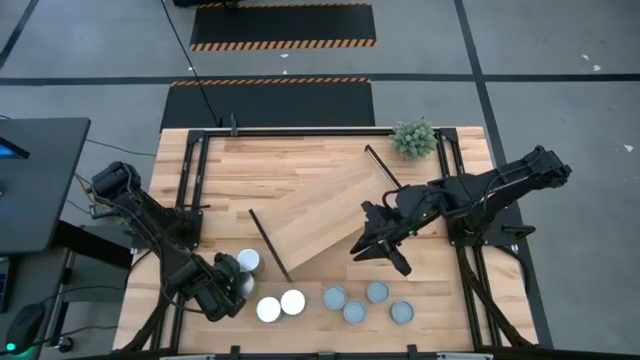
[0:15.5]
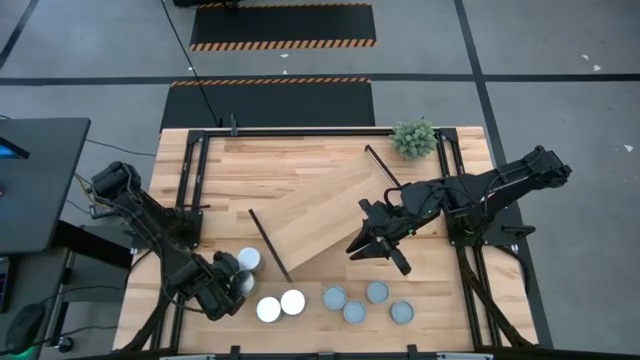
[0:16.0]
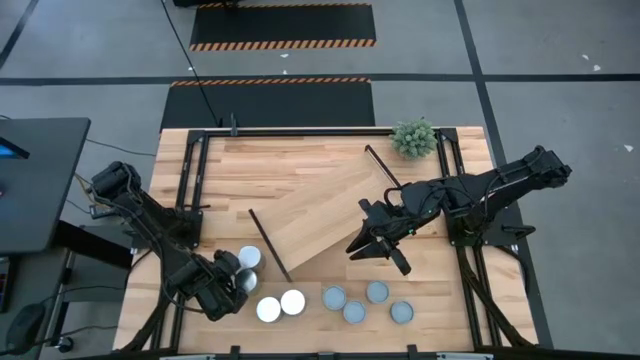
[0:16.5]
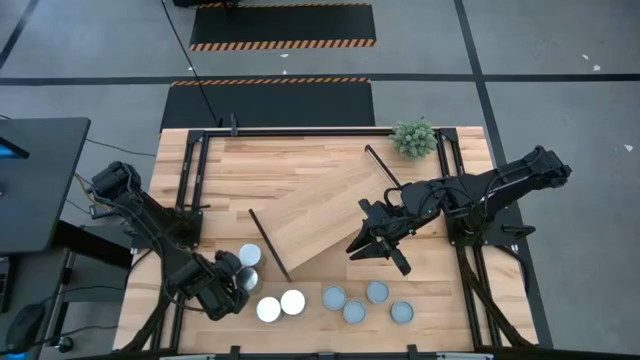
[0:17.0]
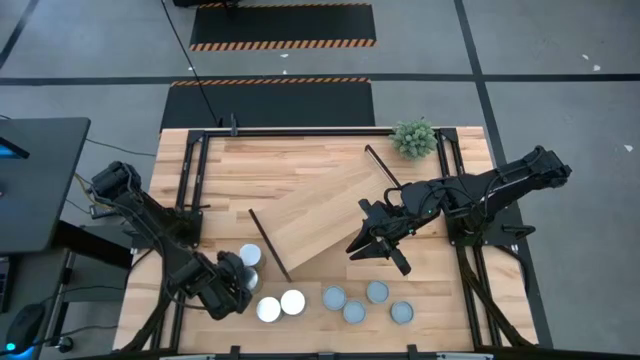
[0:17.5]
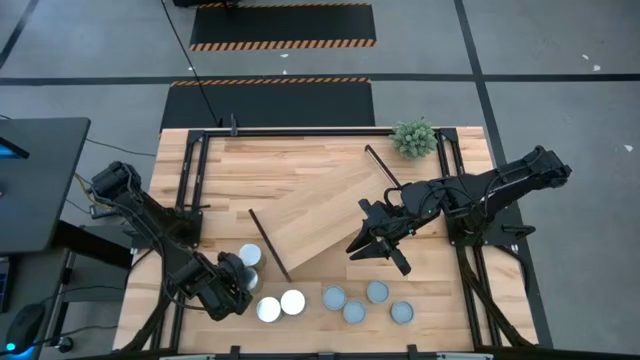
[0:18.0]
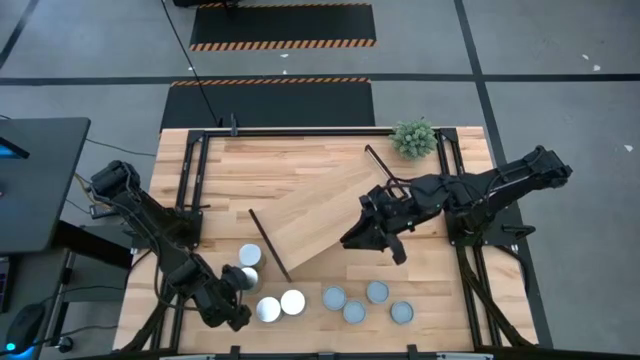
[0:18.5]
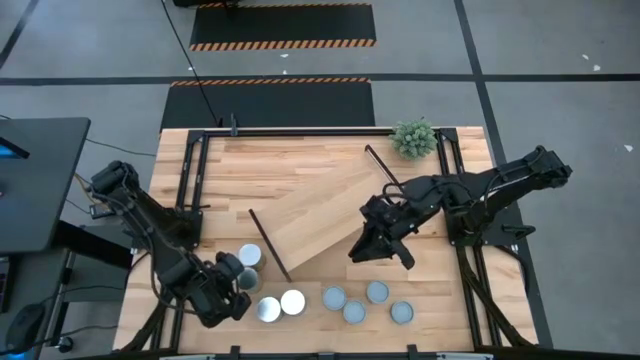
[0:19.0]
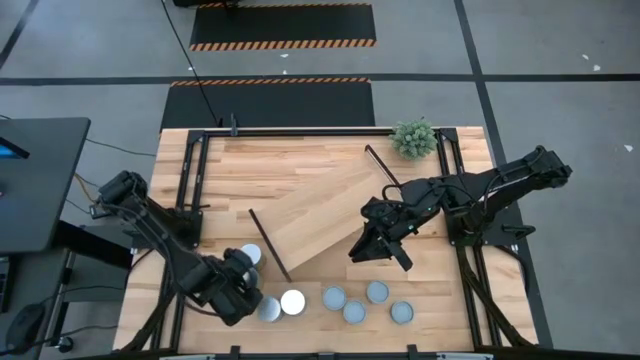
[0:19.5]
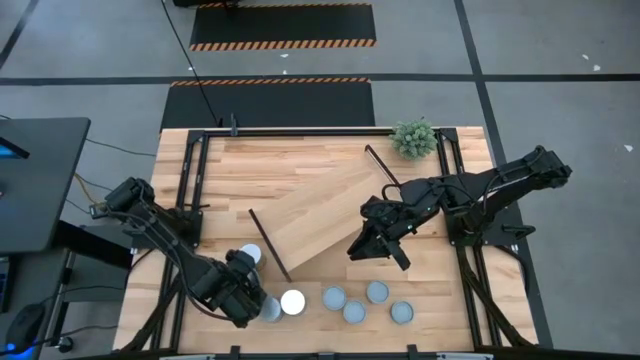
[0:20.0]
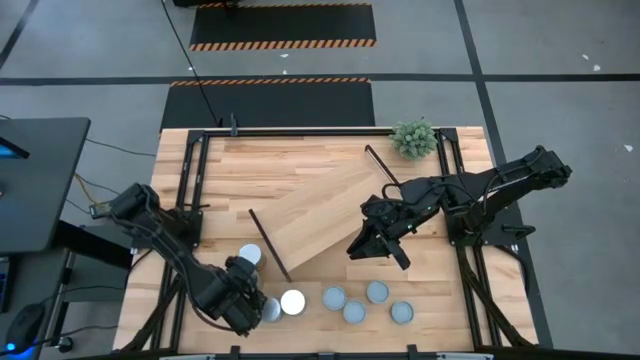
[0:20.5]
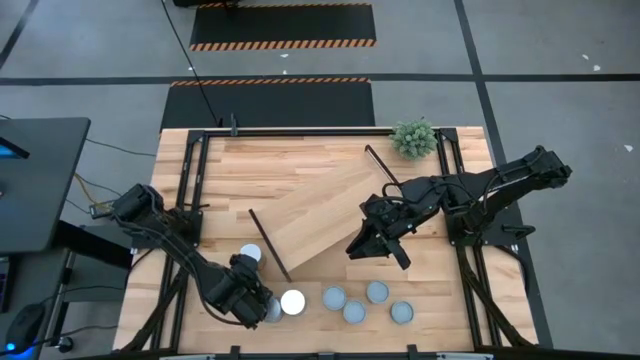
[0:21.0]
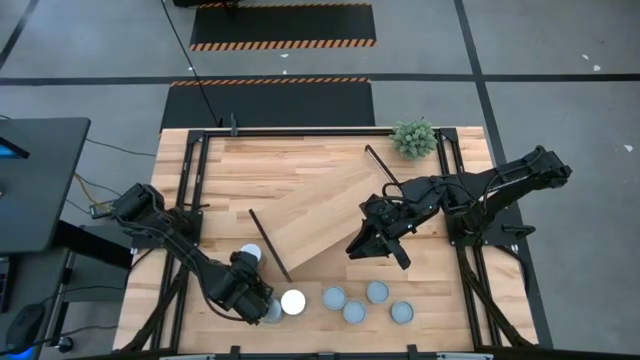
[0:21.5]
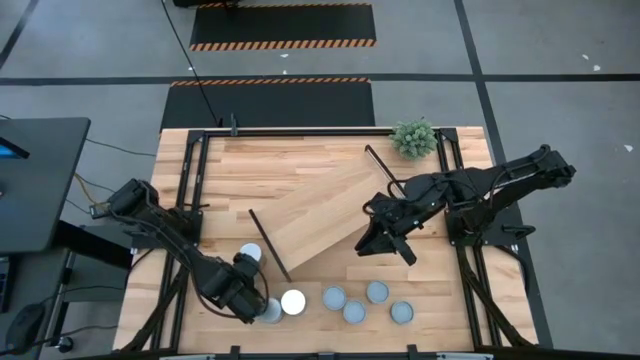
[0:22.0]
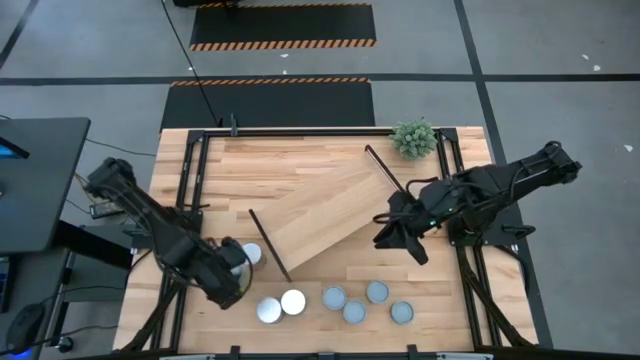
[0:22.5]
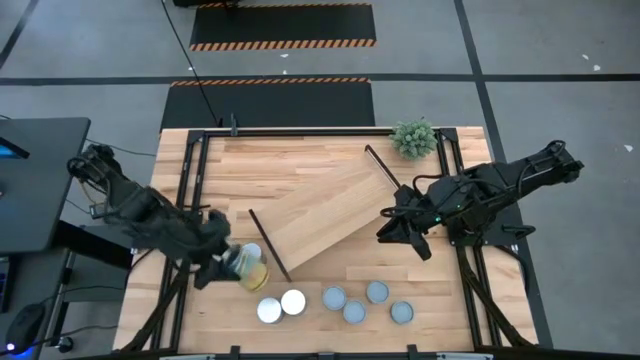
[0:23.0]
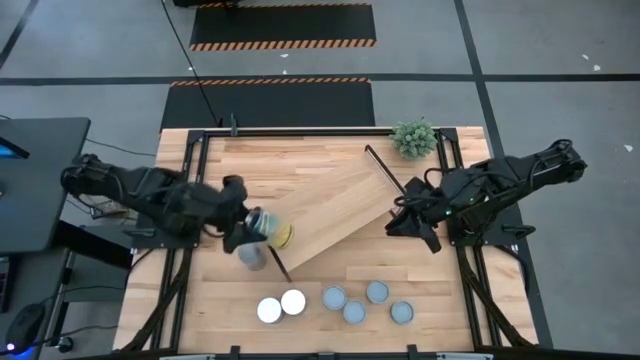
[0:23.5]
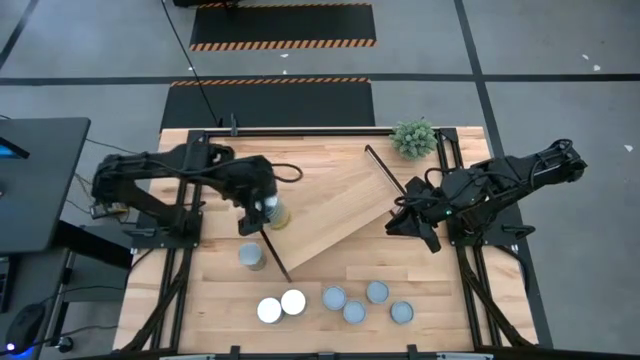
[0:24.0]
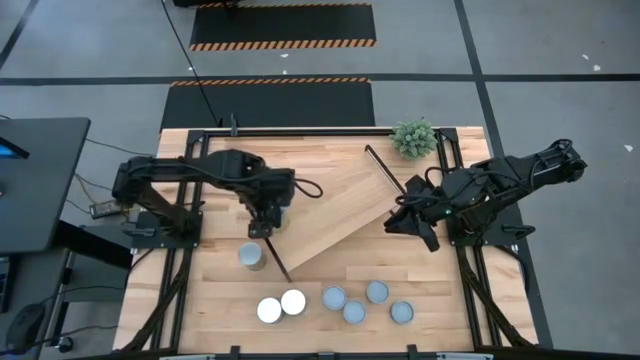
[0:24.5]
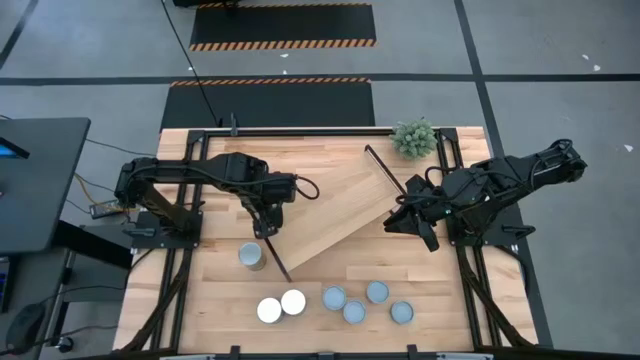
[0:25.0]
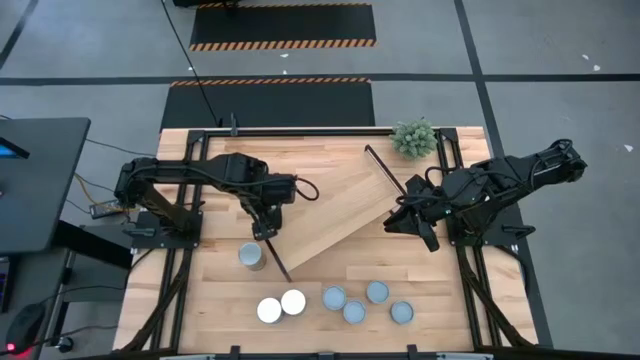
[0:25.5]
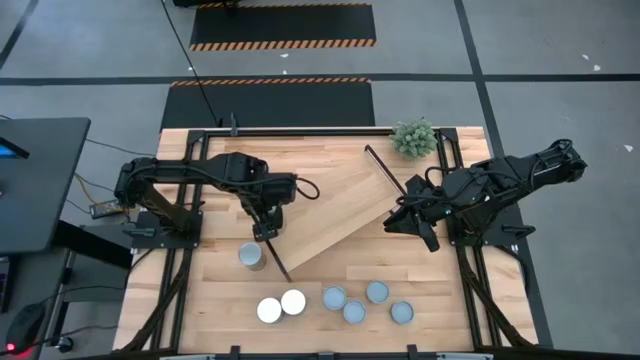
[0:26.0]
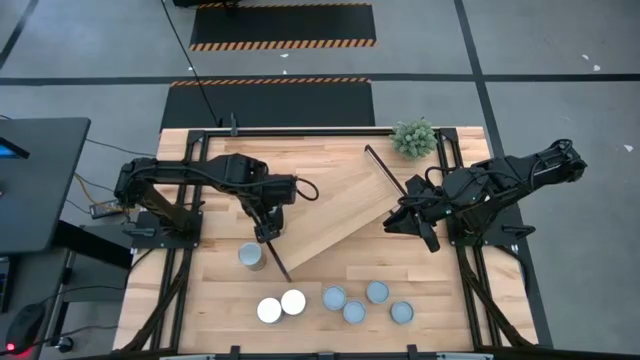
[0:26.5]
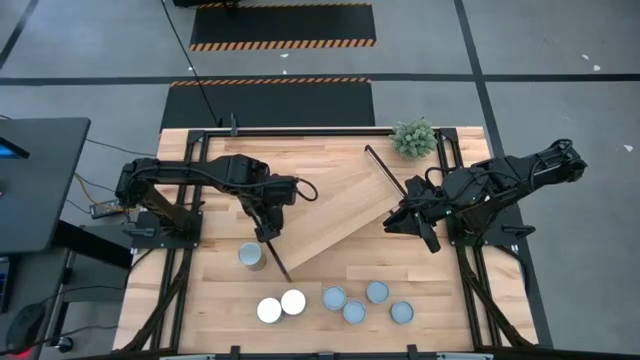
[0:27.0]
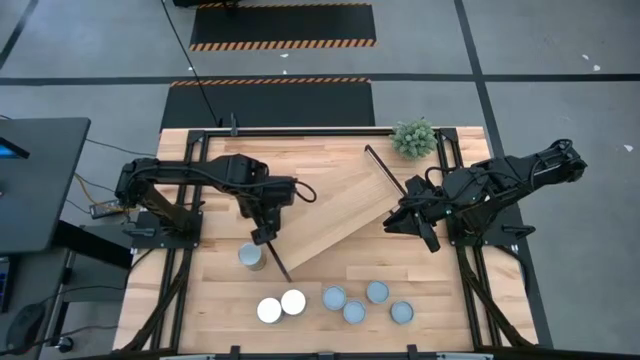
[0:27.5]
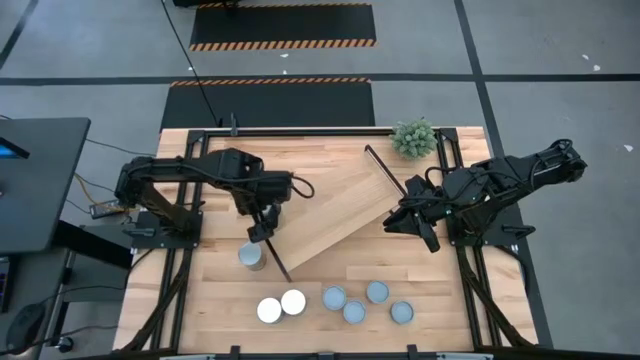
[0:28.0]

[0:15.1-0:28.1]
Task: Pick and place cans onto a shelf
Put the canned carrots on the shelf

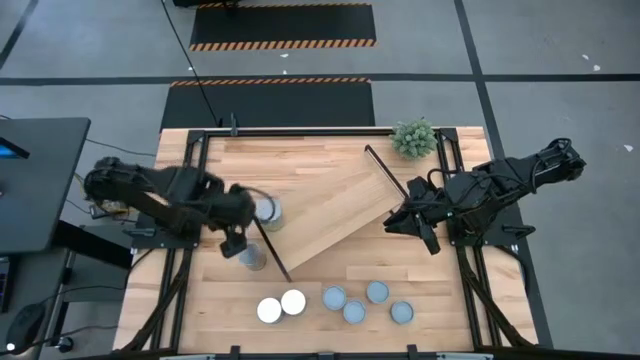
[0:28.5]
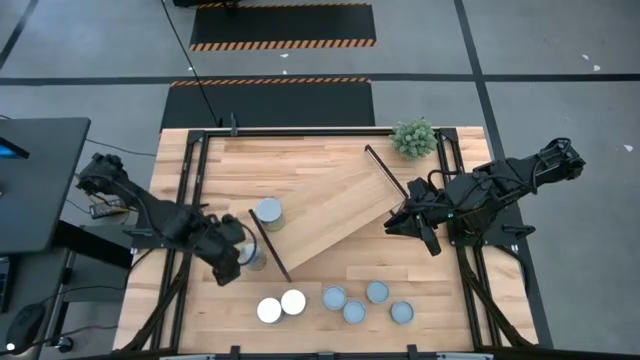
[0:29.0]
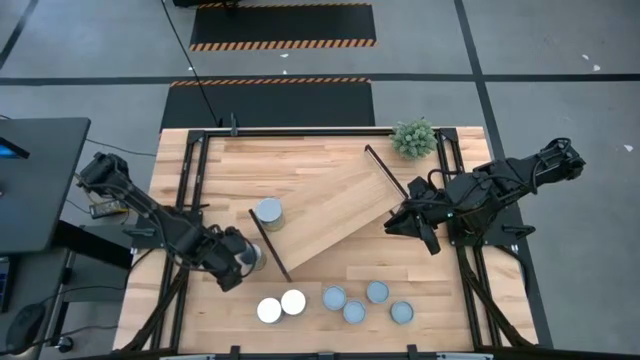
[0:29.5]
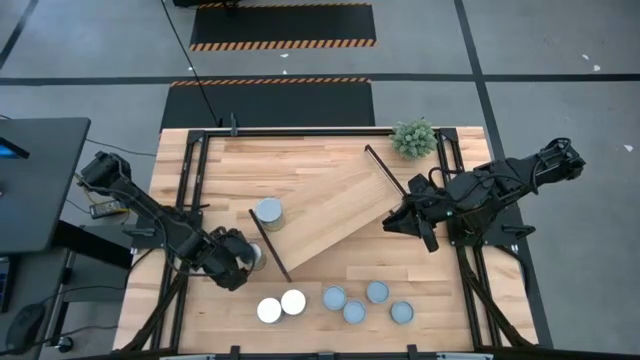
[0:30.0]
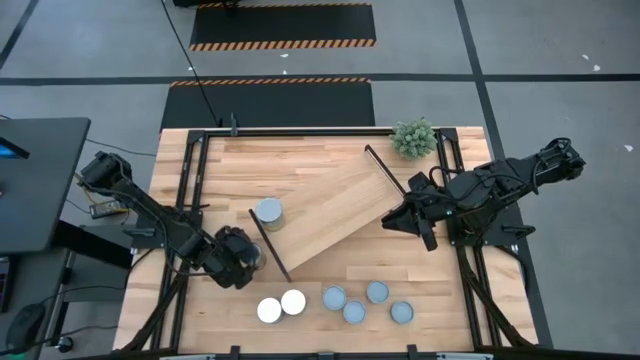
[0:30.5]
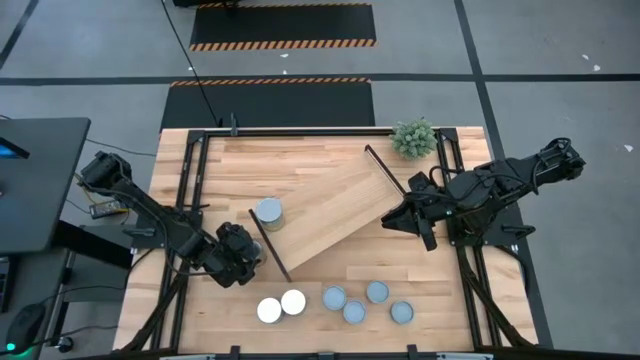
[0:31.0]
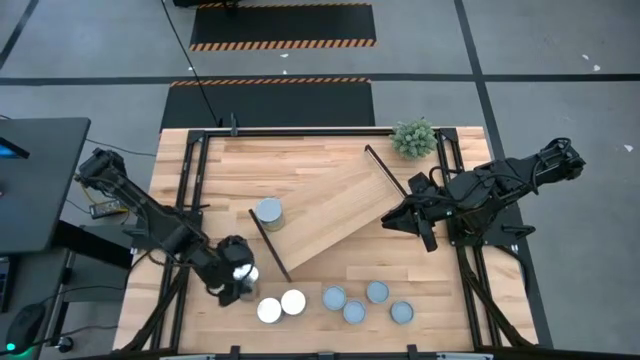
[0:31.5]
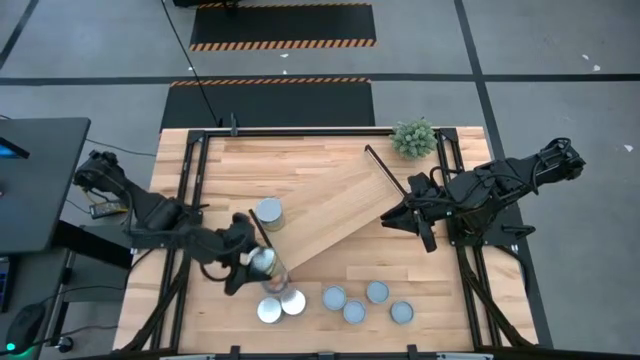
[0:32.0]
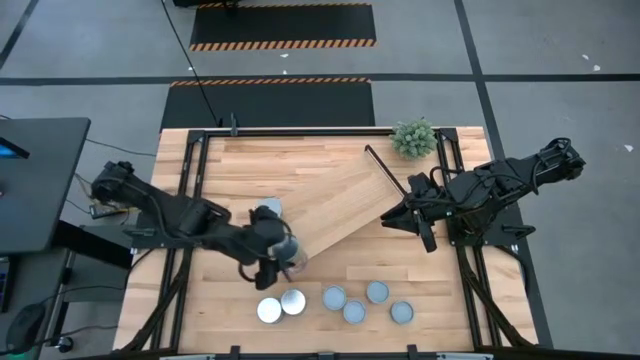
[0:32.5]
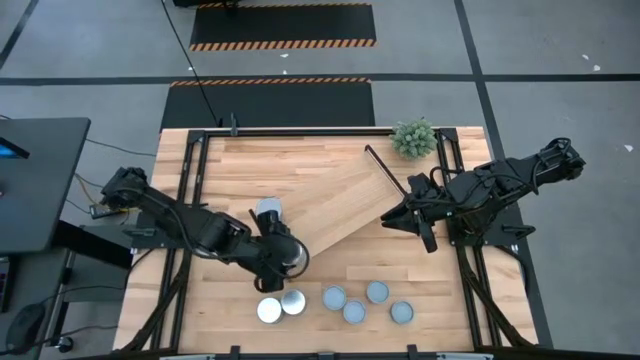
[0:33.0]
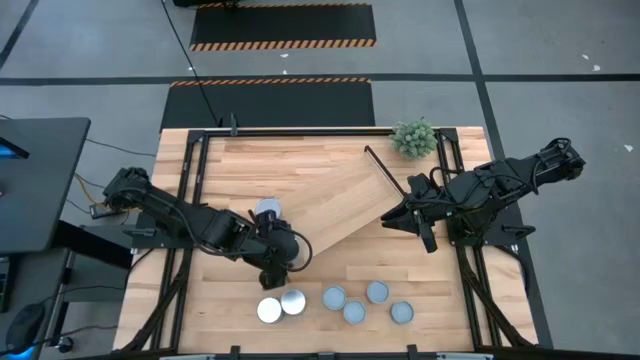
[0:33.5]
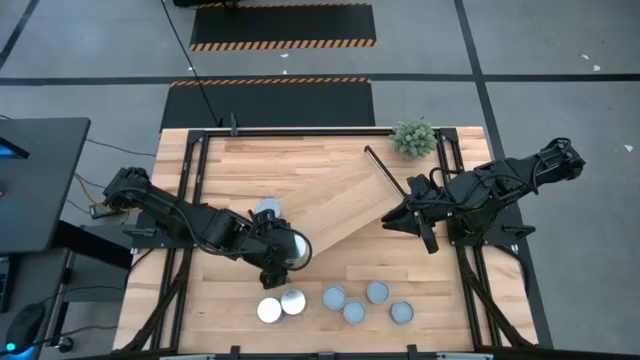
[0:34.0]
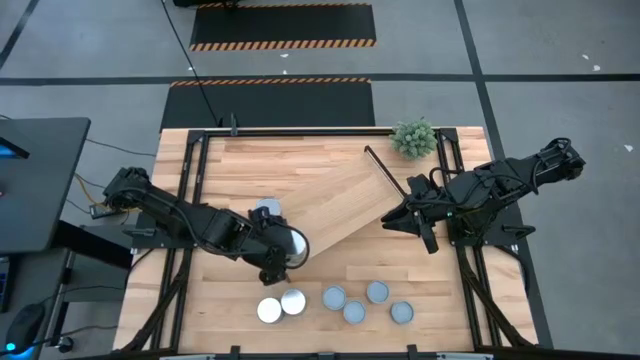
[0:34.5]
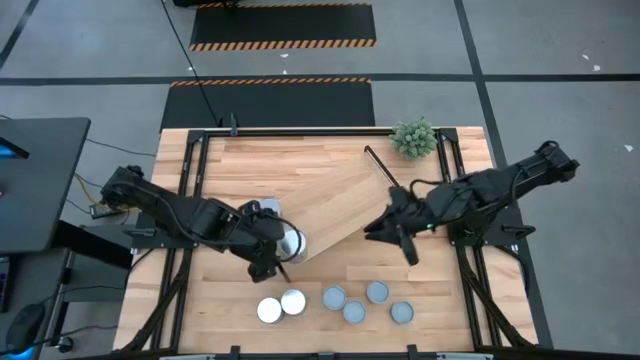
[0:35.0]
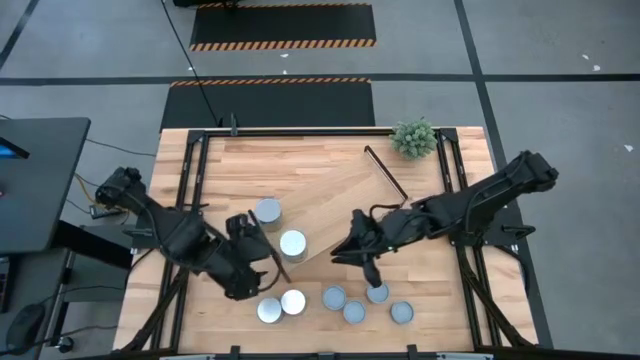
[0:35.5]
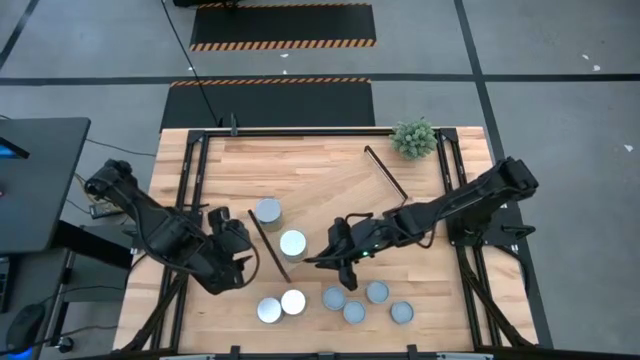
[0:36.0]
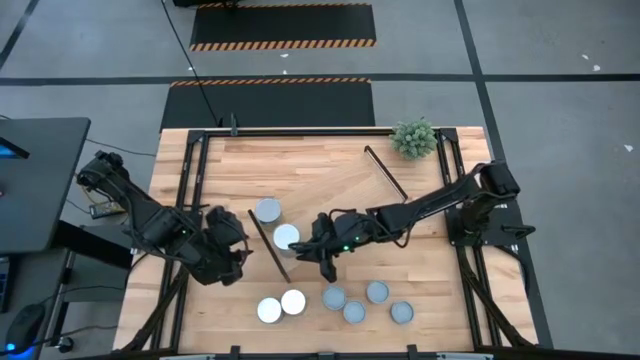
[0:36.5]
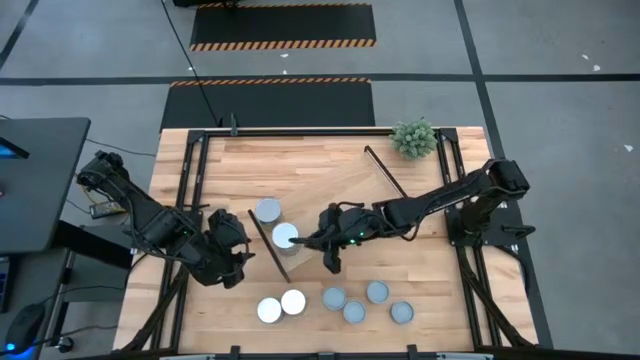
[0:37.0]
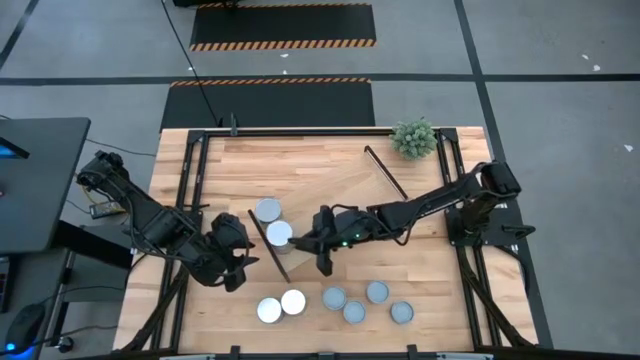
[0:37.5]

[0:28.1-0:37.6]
Put the canned peaches on the shelf
